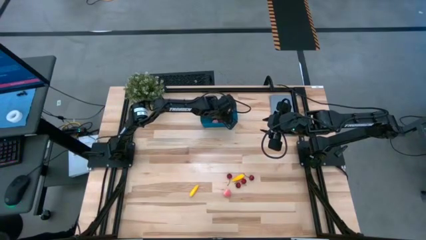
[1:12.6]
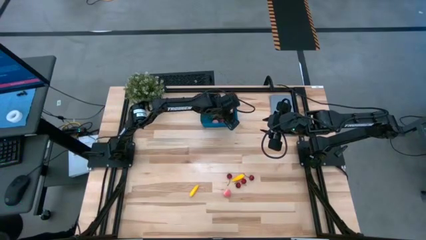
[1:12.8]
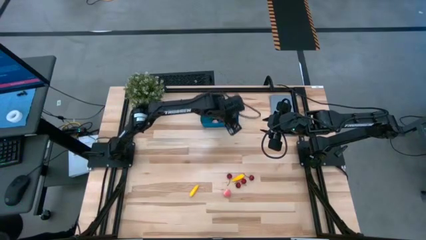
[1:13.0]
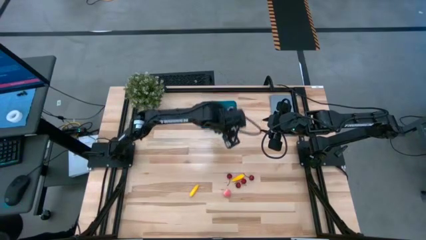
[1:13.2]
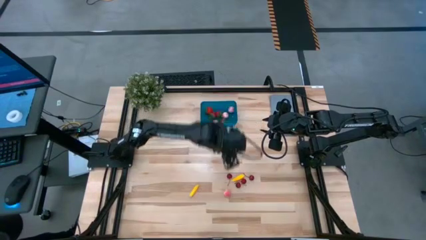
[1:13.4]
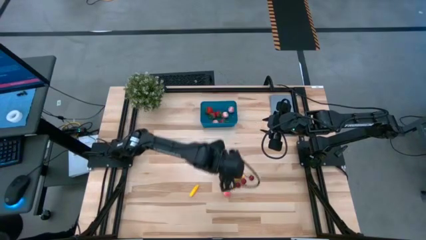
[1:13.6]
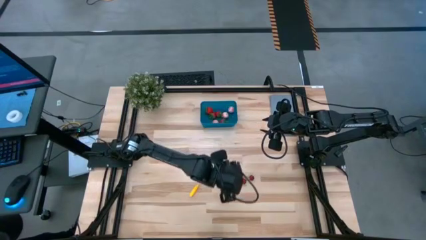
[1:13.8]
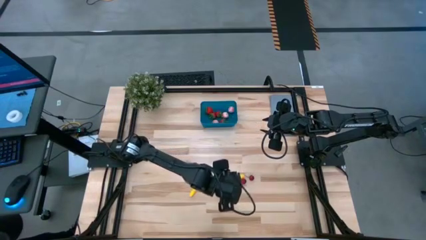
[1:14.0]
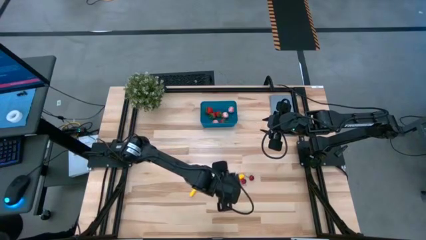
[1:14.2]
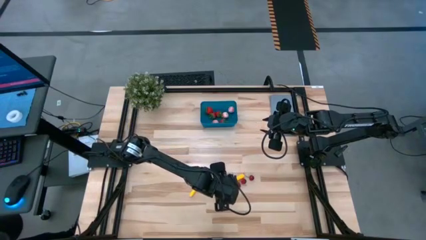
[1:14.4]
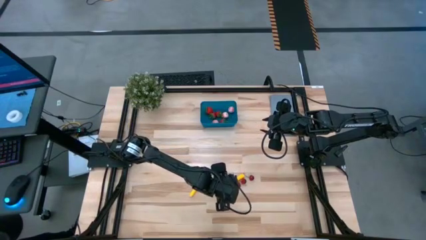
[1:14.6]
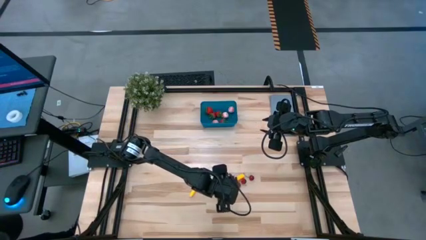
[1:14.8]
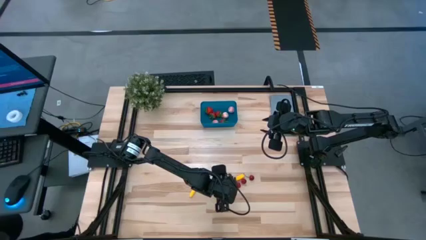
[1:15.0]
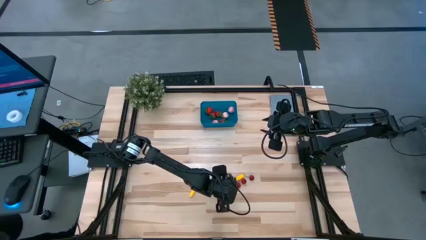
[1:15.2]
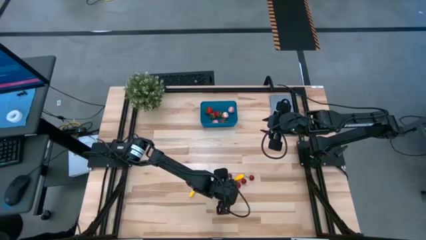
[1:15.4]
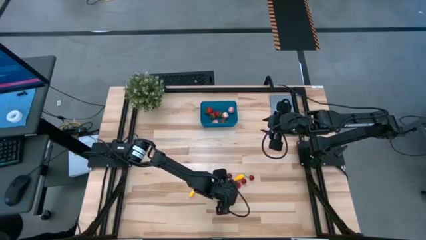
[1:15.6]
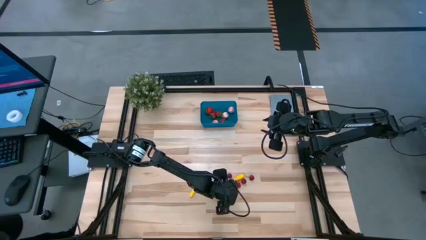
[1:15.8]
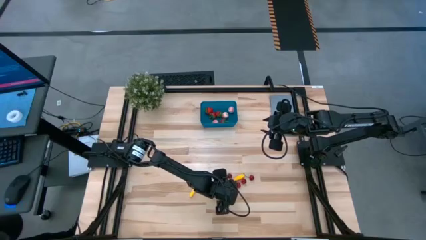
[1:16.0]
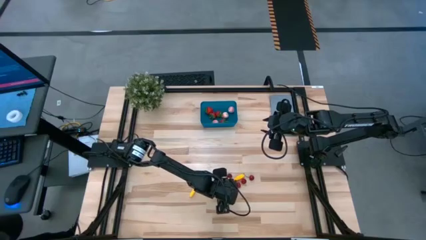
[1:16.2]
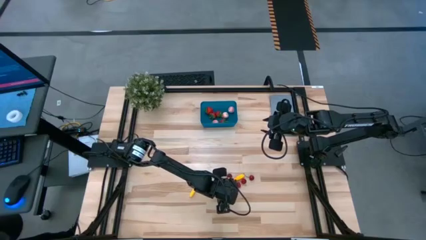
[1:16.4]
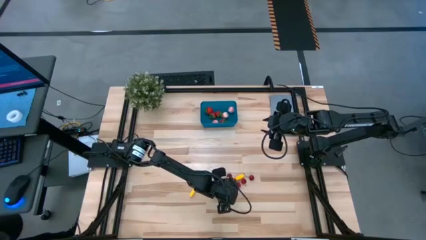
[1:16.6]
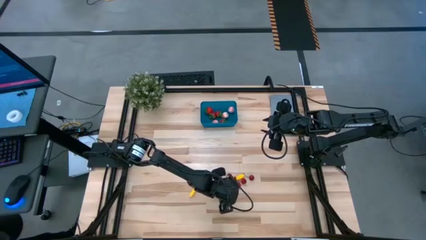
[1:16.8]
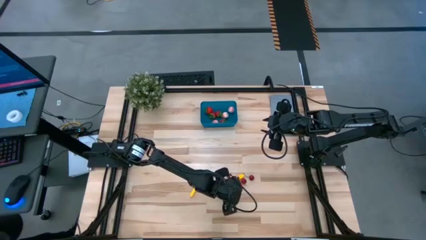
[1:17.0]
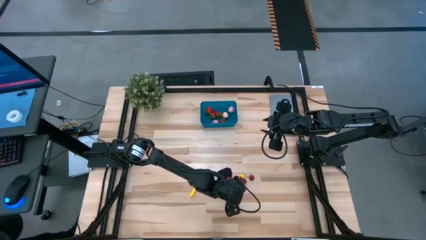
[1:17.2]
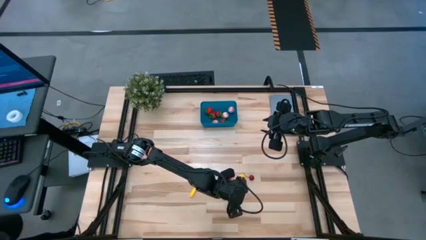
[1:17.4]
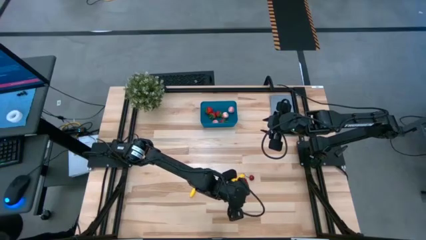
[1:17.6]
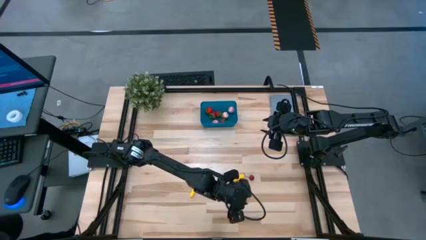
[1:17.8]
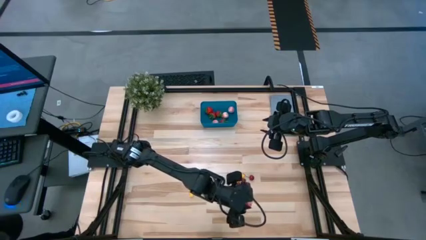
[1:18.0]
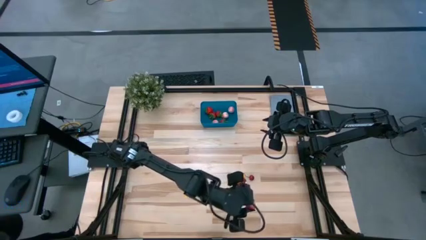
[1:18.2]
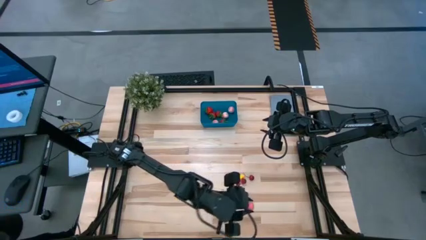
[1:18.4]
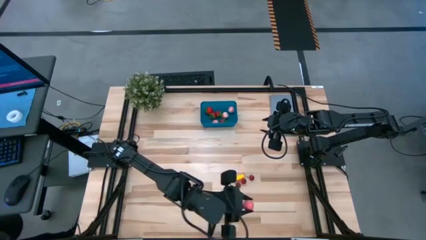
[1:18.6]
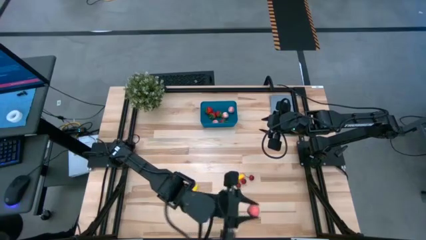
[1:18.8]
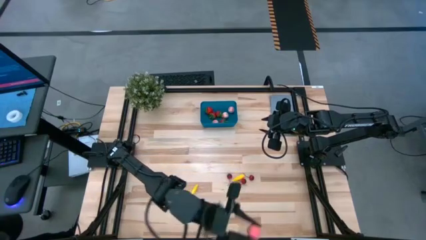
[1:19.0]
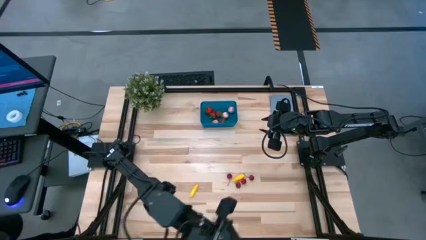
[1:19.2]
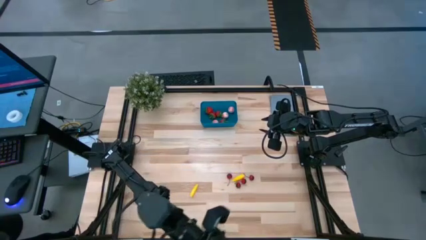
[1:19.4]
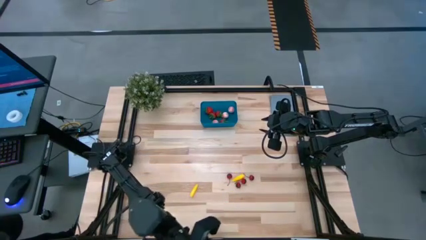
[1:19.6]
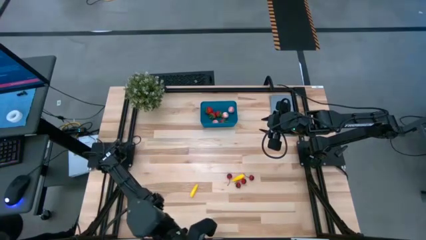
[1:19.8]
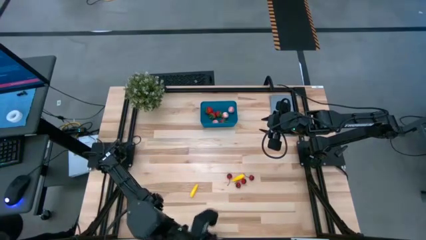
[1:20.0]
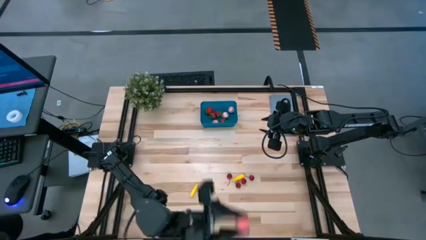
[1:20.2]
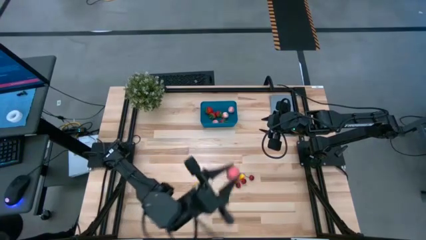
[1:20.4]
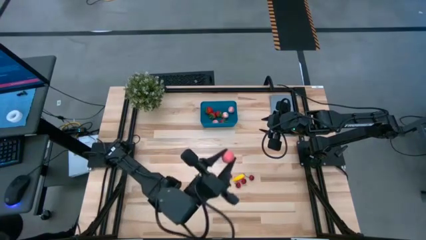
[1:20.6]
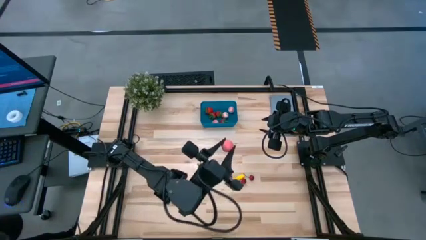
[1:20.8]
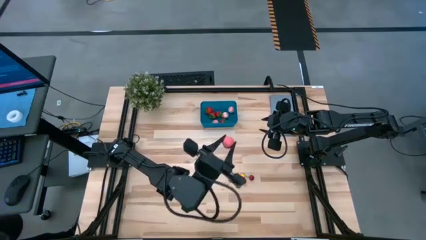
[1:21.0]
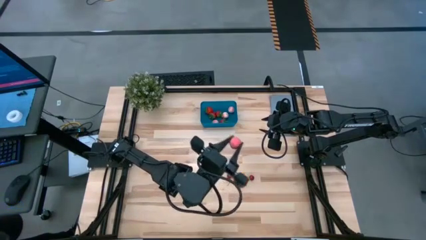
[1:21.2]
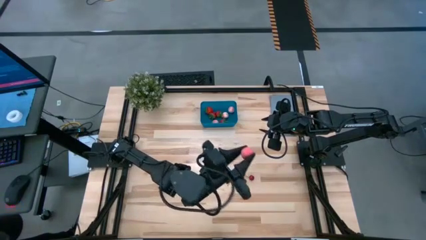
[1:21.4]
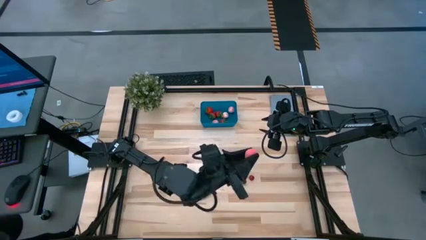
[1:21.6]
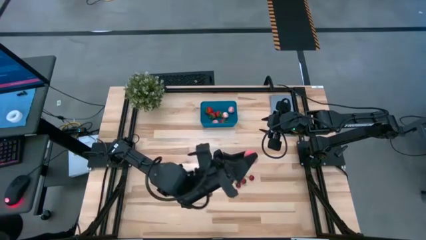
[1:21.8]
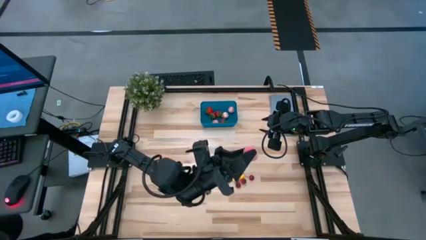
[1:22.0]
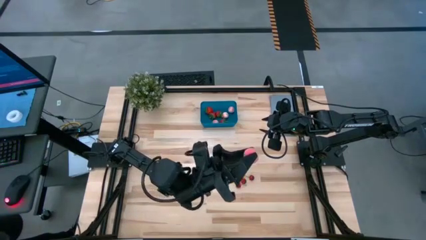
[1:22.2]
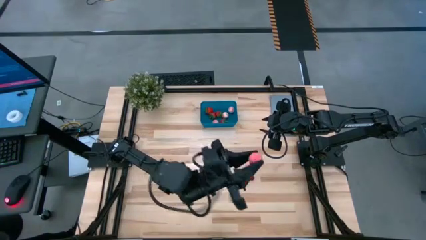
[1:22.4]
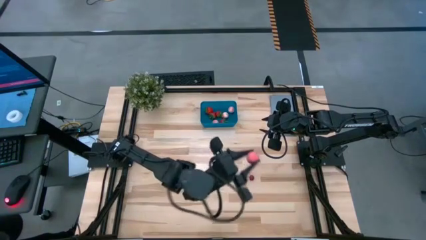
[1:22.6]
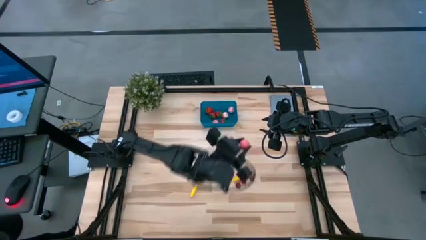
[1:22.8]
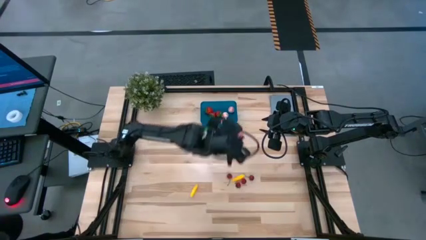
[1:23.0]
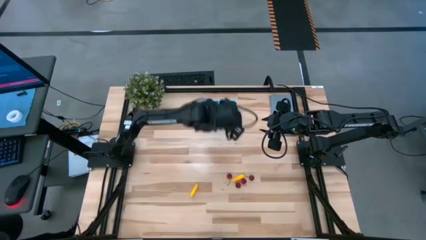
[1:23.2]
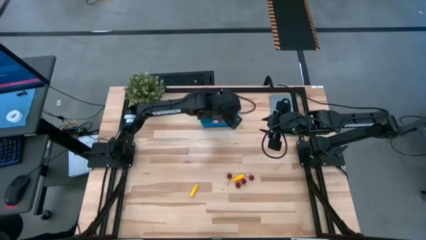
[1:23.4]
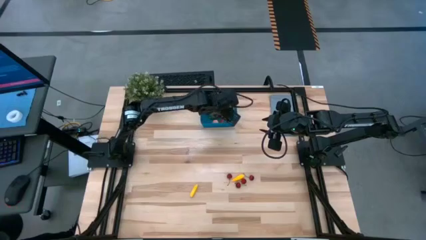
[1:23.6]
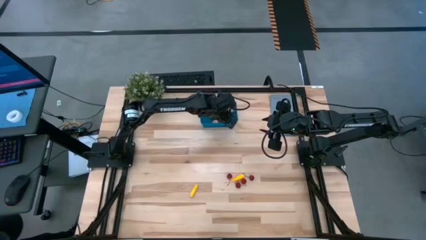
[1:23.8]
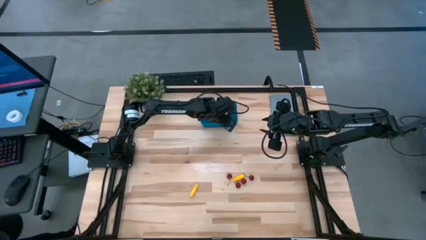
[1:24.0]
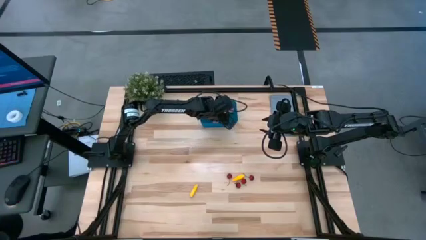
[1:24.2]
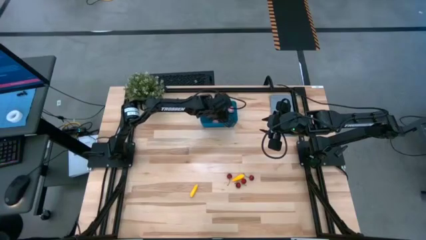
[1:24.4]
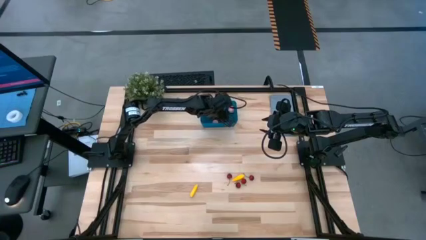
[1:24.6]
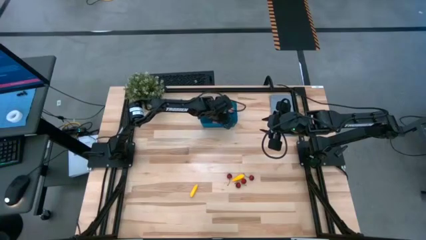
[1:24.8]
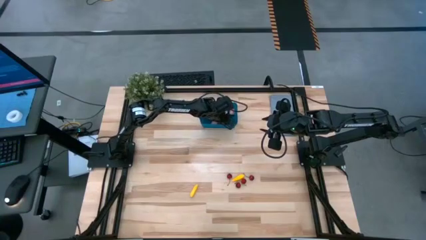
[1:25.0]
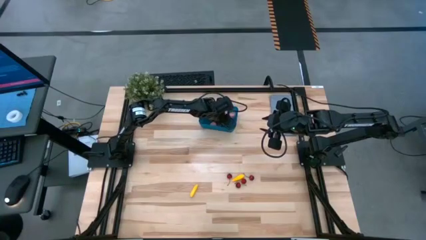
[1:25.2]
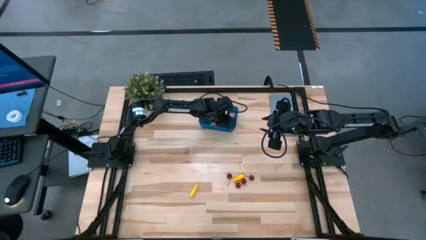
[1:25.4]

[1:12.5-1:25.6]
Task: Pick and placing Produce into tupperware
Put the peach into the blue bin

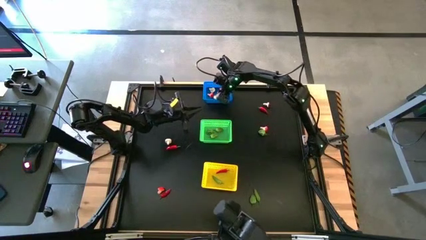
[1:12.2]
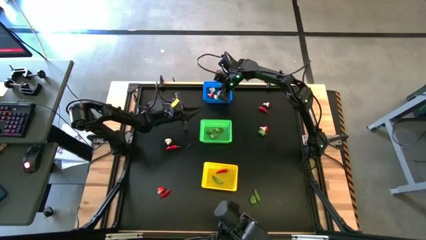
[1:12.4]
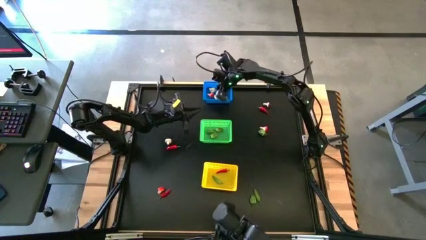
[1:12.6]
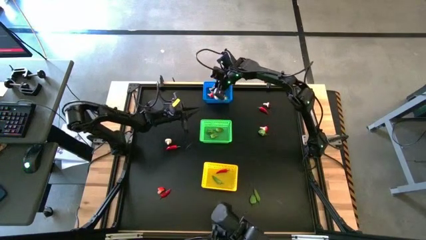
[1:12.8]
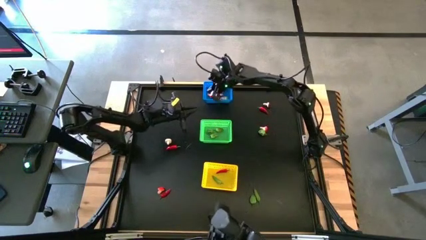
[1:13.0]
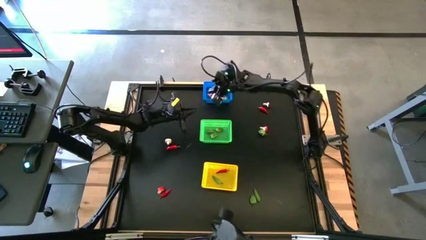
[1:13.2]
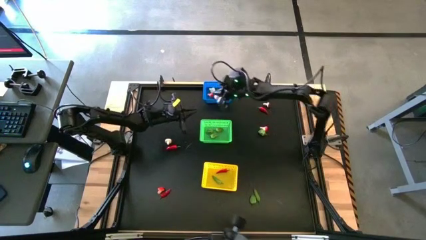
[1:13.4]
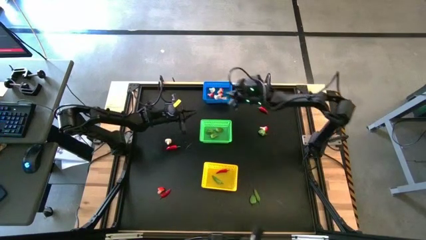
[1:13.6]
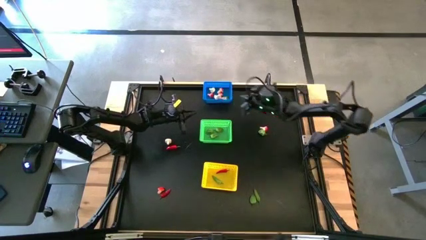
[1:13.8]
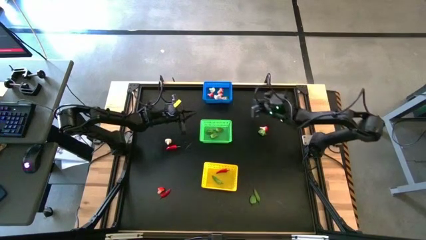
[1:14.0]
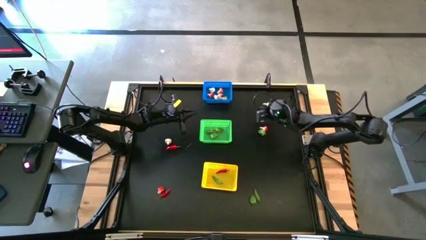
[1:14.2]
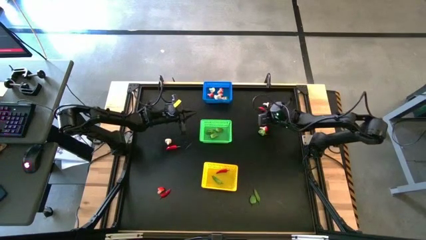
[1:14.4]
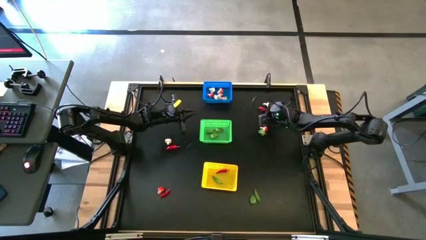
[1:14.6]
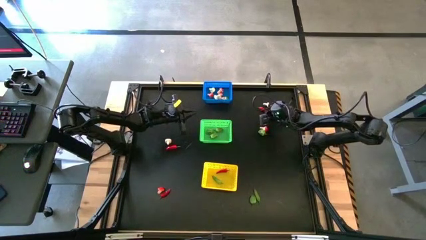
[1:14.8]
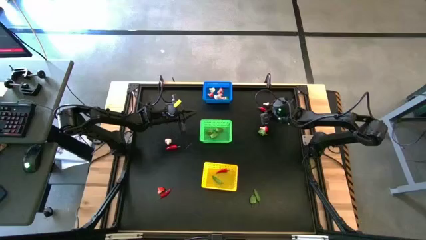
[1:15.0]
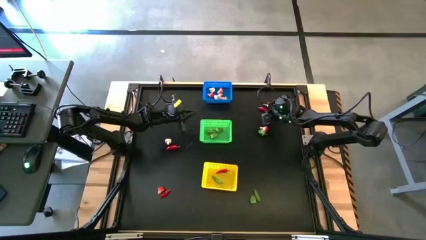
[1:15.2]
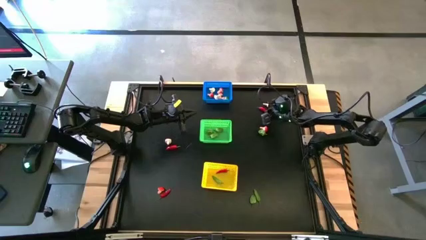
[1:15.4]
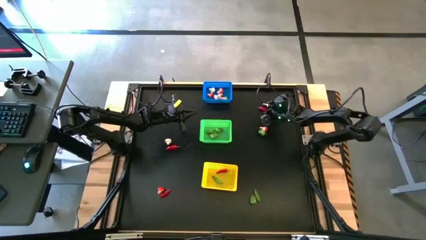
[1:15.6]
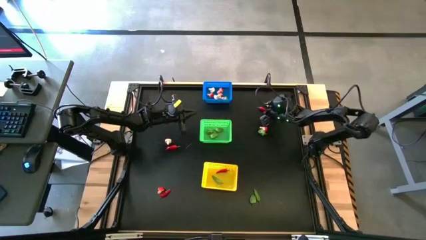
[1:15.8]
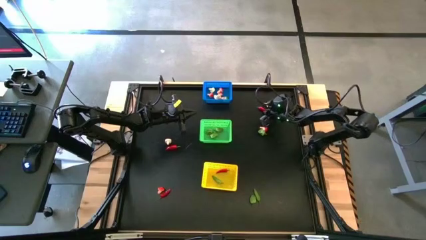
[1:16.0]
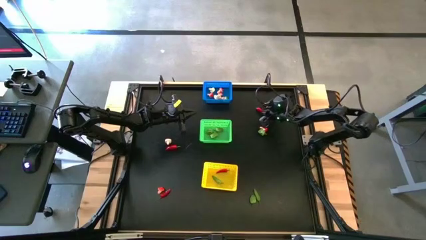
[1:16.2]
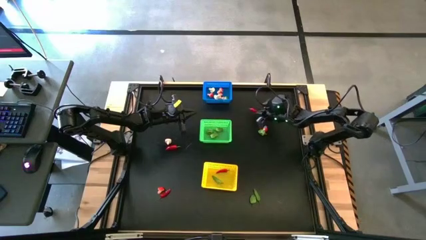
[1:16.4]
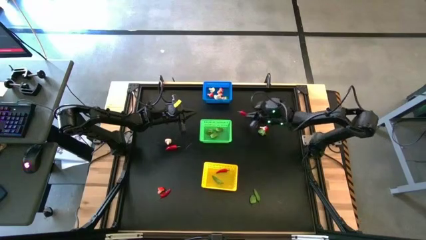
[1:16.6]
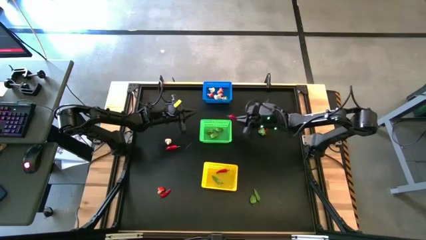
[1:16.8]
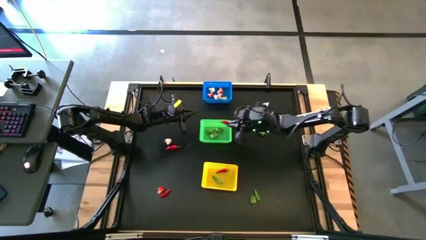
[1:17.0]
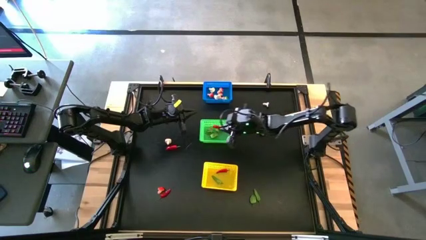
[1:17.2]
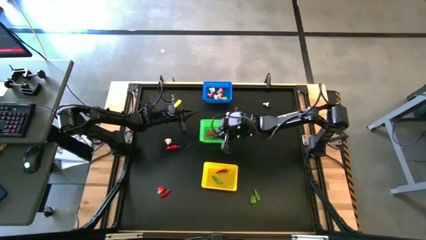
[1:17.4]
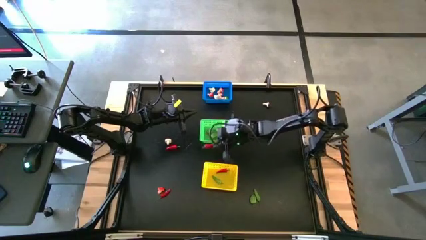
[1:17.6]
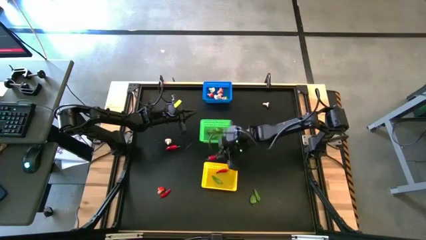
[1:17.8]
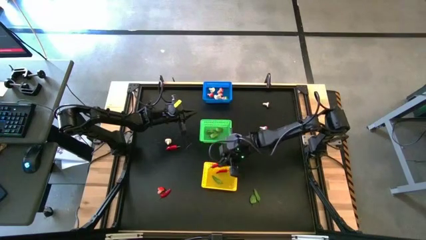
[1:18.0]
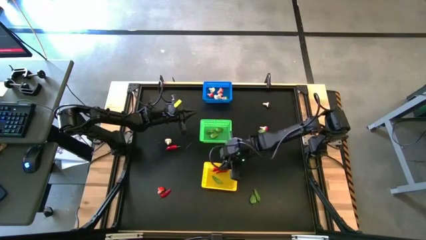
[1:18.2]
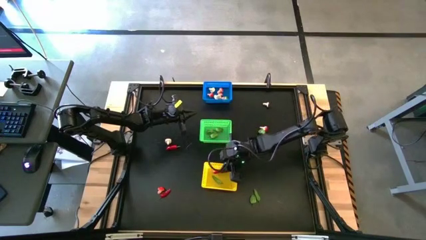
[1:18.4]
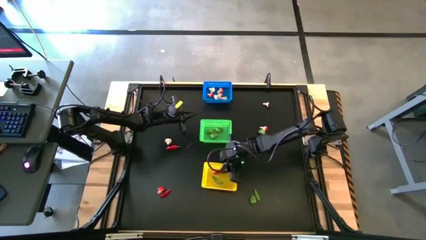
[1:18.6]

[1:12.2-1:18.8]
Task: Sort produce into baskets
Put the red chili pepper into the yellow bin
